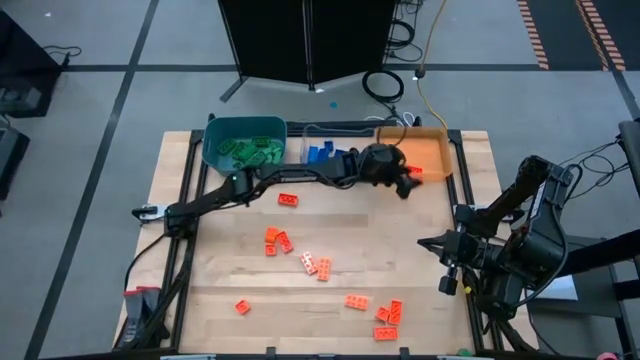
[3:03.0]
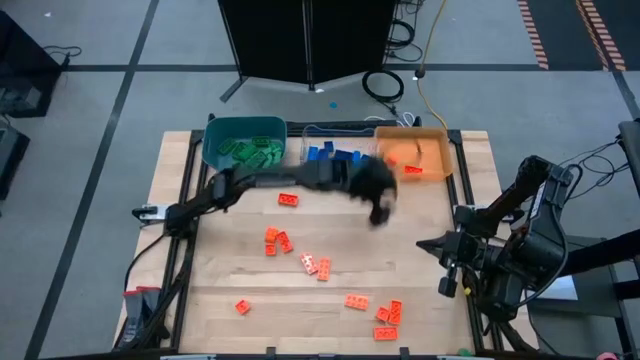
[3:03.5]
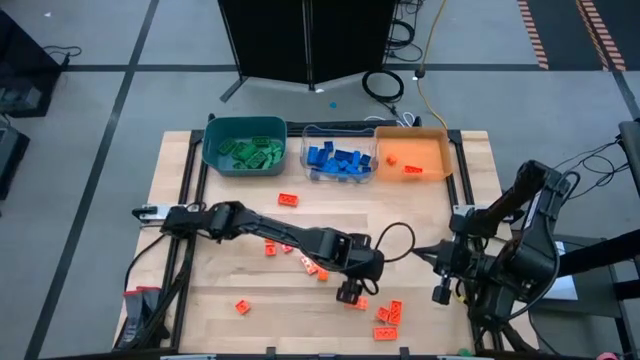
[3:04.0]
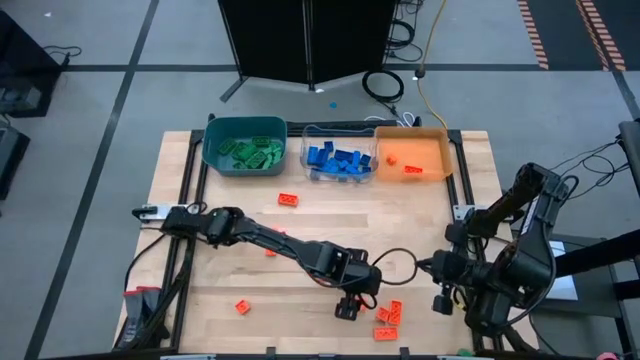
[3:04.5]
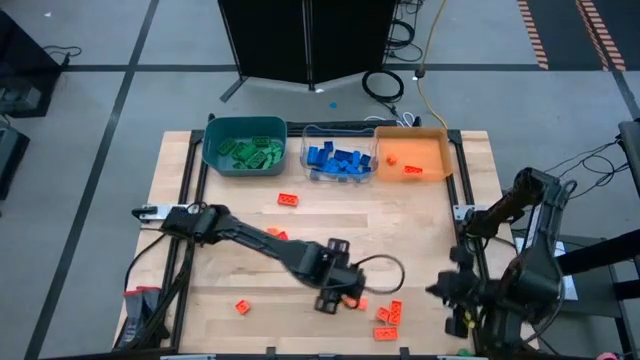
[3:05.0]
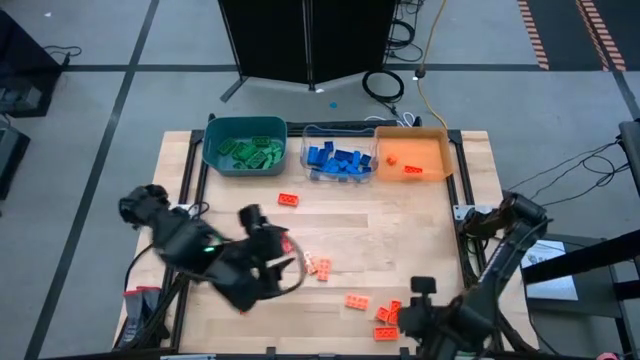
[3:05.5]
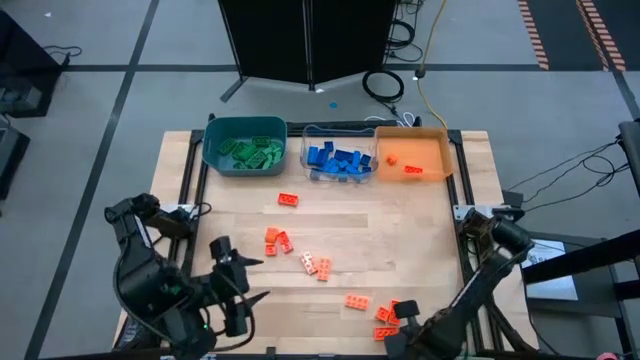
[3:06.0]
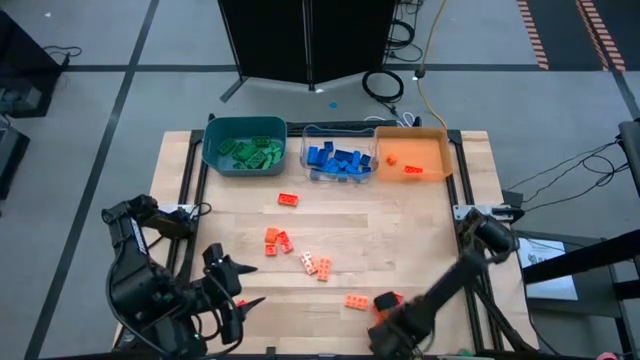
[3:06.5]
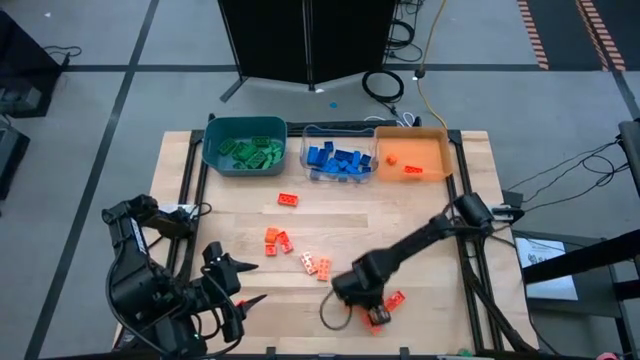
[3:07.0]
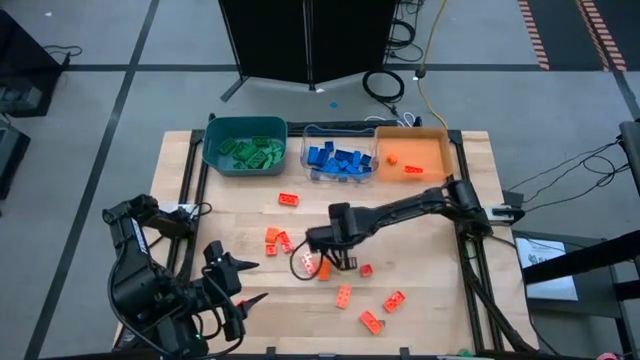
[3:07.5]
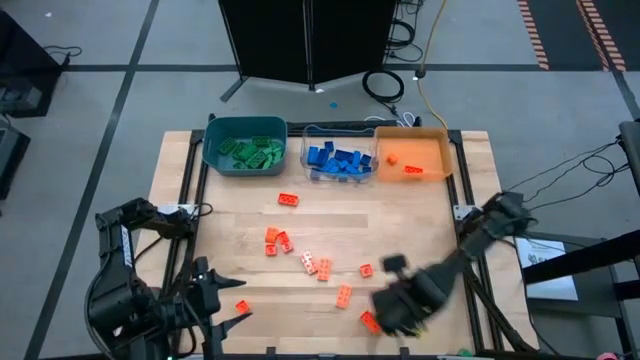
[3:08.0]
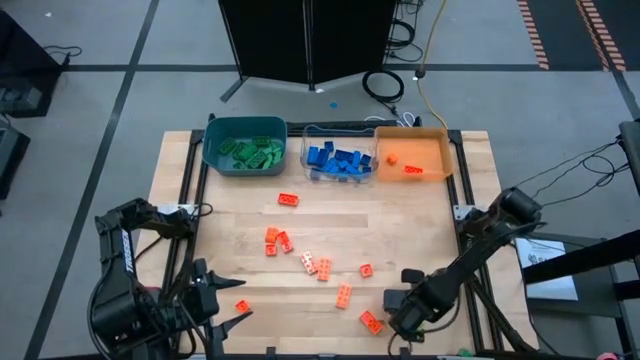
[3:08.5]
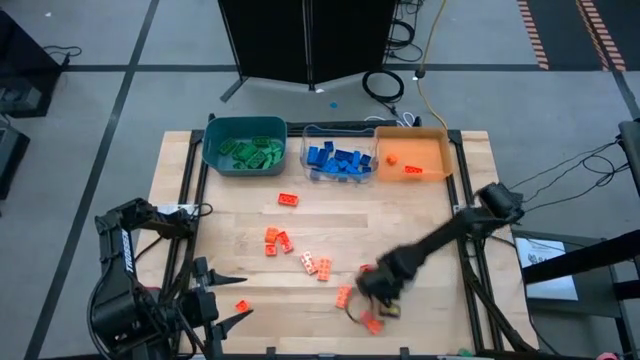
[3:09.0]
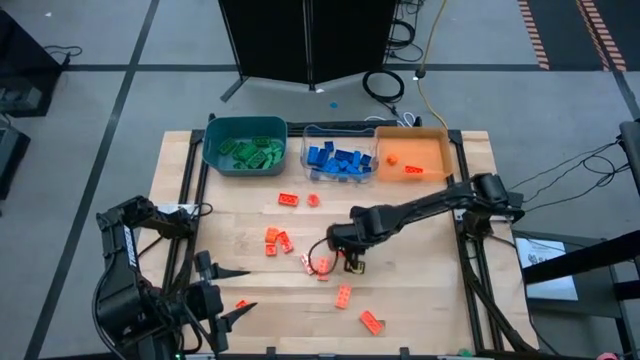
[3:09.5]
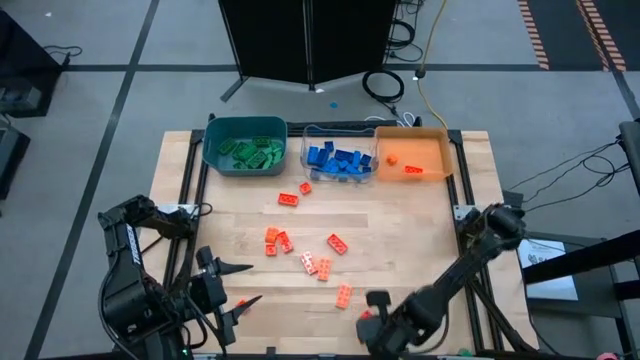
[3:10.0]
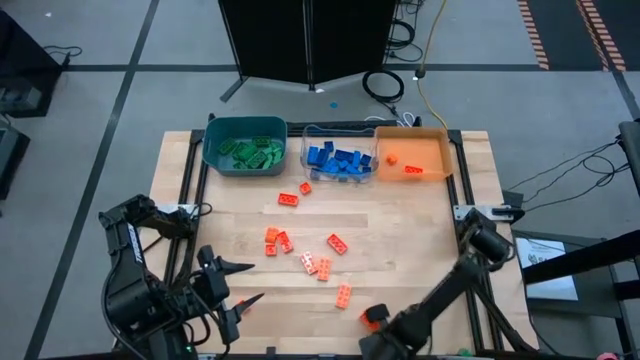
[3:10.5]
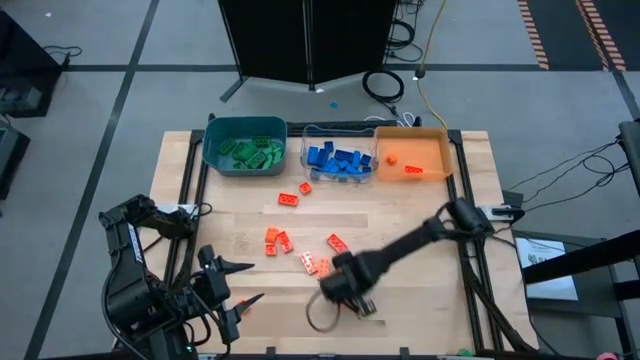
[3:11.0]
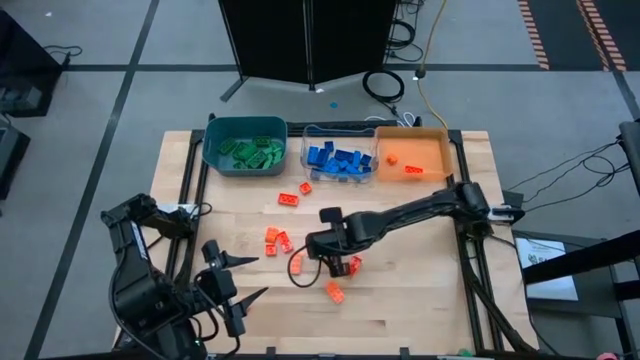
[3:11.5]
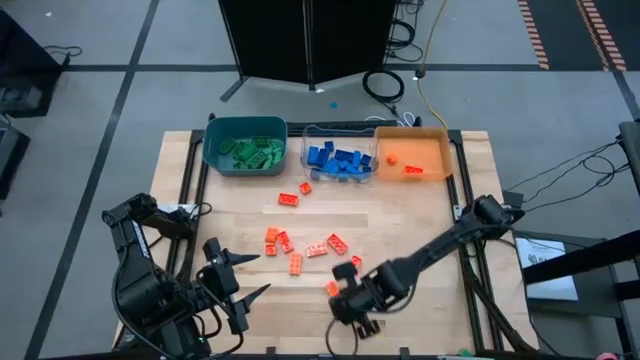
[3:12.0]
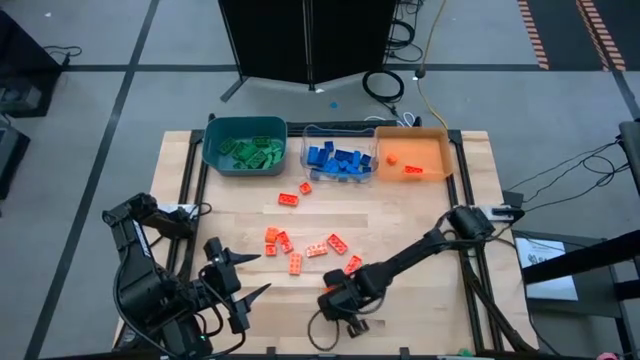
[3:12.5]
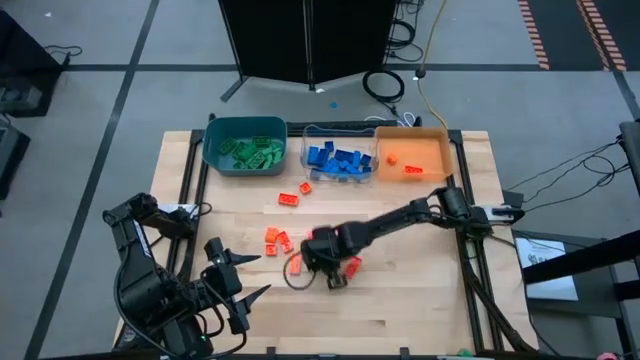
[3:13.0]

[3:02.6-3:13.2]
Task: Sort blocks
Adjust the orange game pieces

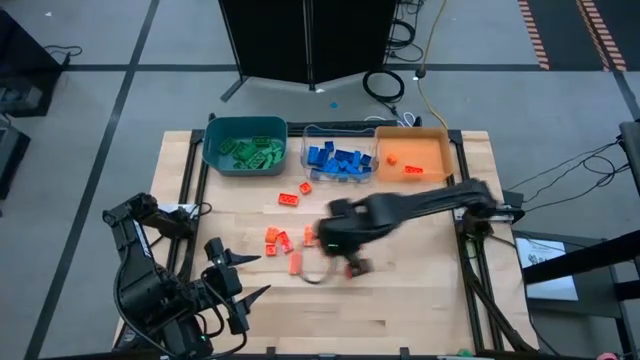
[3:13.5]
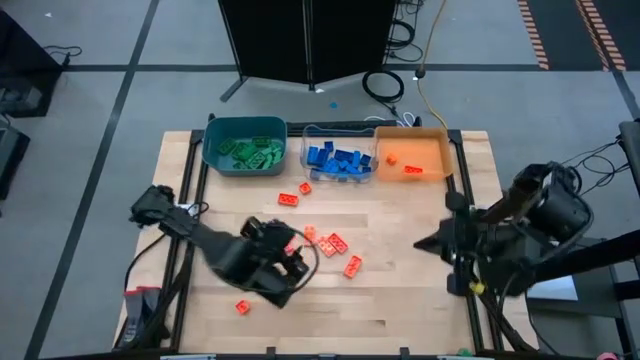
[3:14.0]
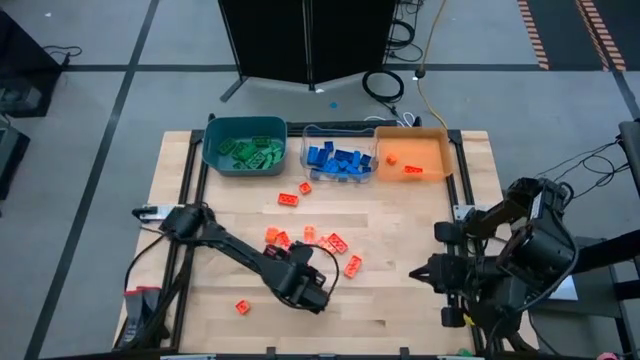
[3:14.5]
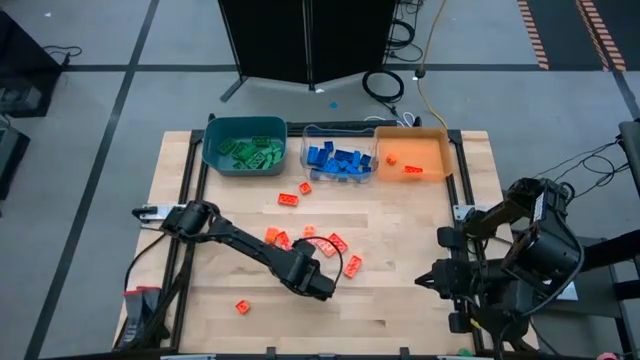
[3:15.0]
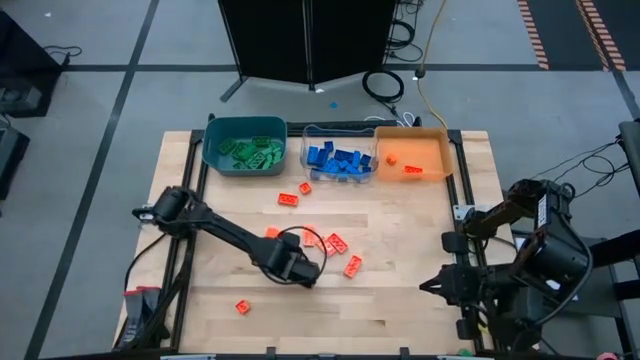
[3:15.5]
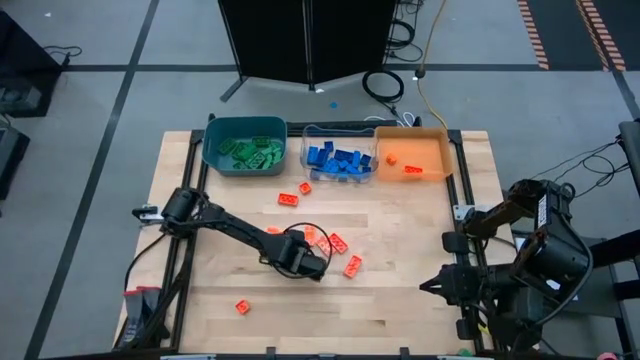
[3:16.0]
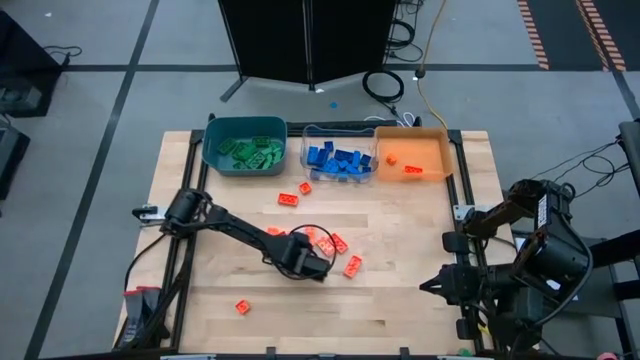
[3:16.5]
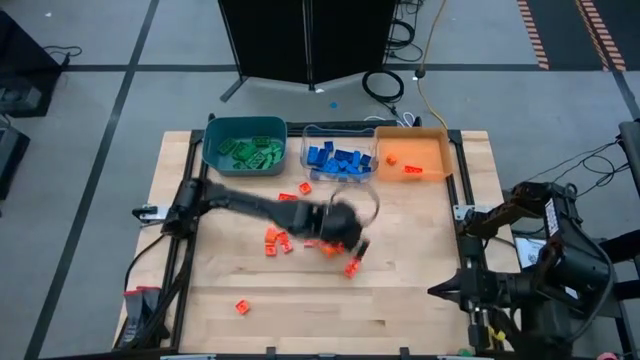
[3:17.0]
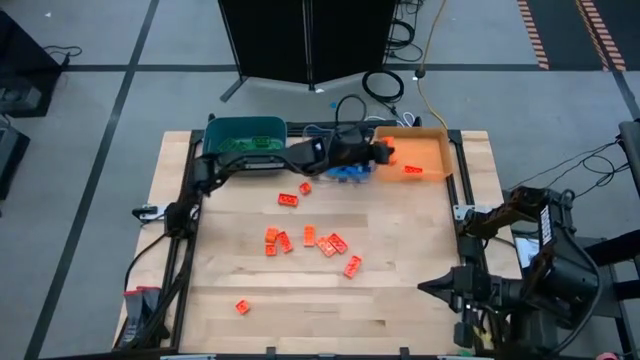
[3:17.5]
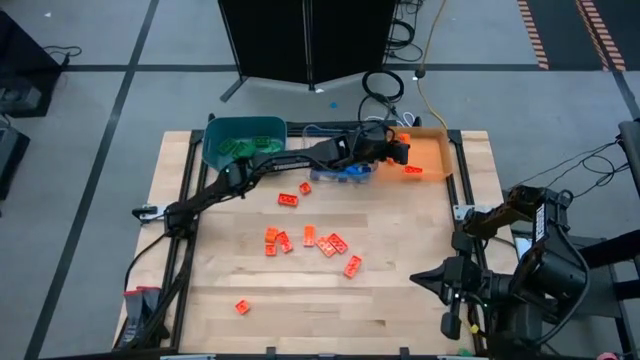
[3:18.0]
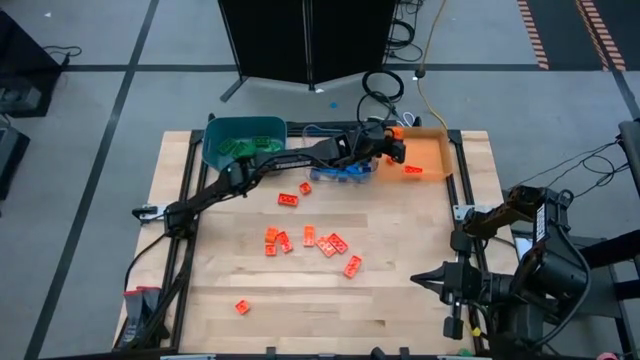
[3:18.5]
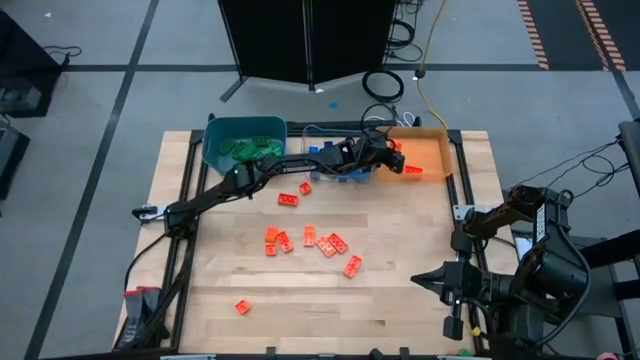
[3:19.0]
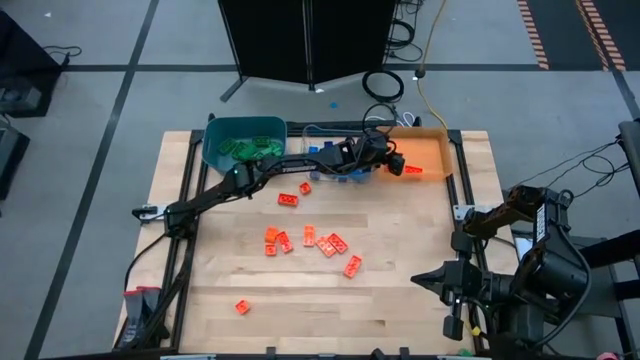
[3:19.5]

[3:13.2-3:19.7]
Put the orange game piece into the orange transparent bin

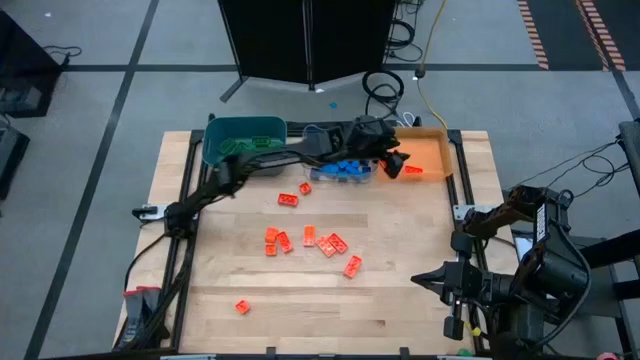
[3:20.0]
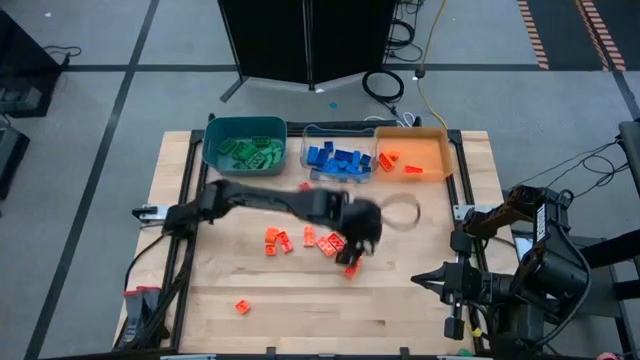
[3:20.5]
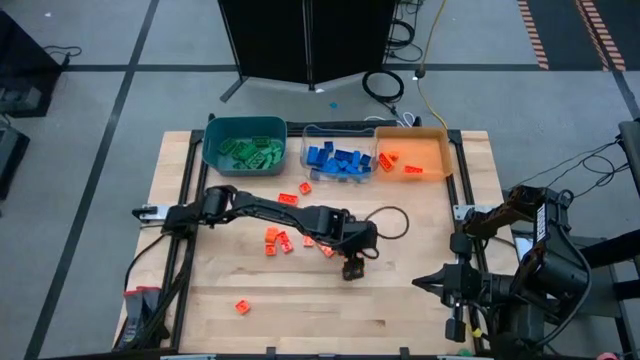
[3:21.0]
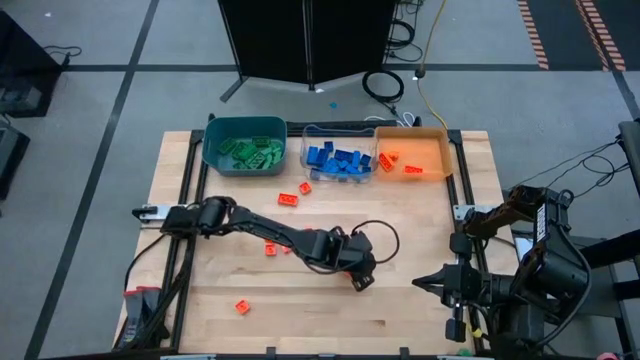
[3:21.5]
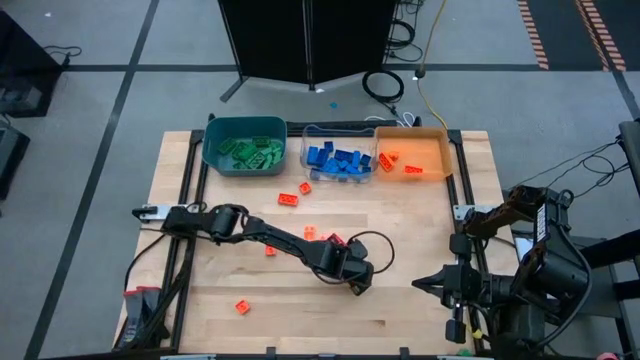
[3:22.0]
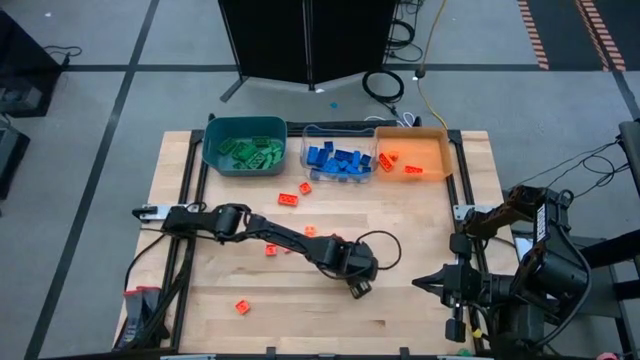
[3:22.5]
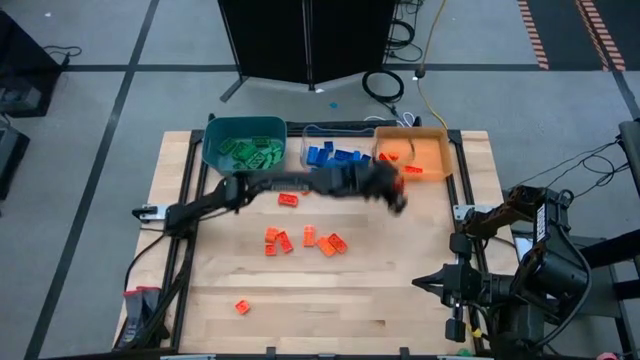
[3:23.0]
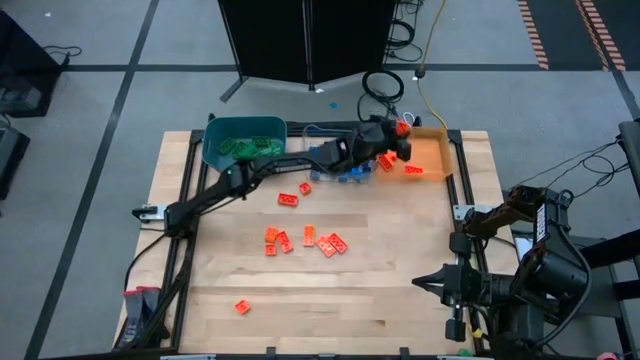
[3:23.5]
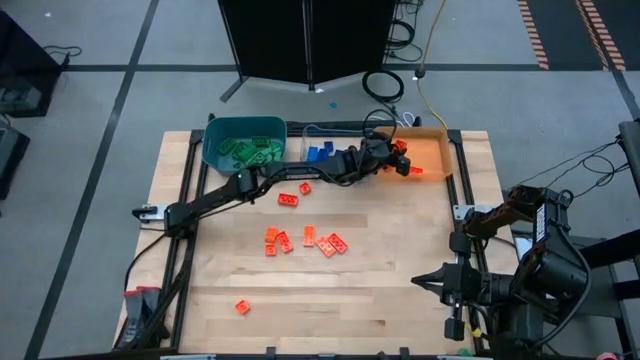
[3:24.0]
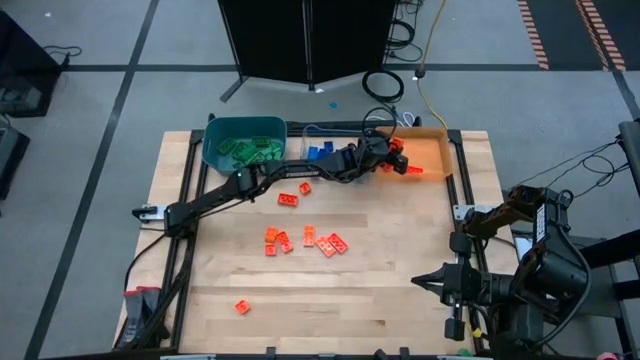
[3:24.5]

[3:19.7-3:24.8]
Put the orange game piece into the orange transparent bin
